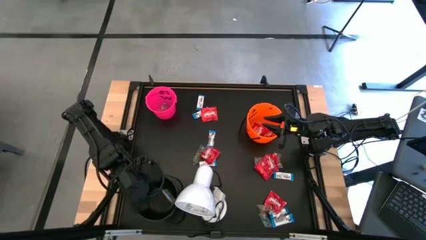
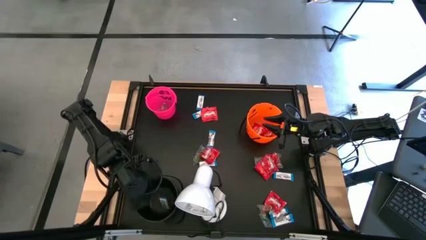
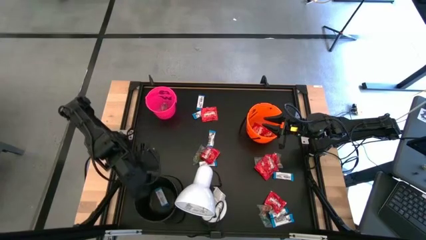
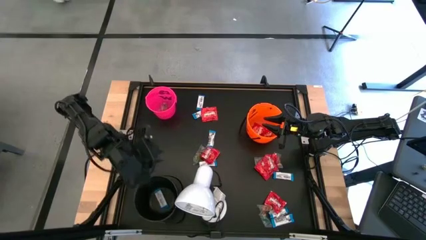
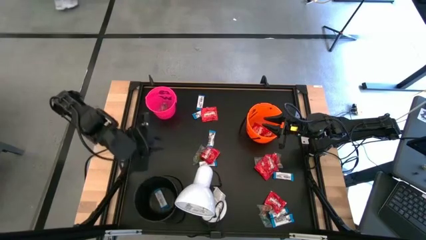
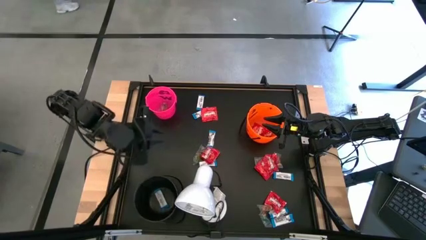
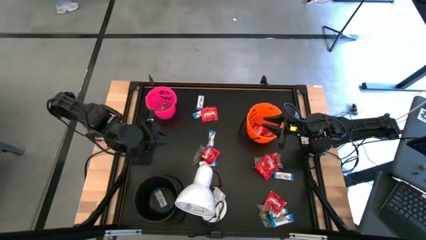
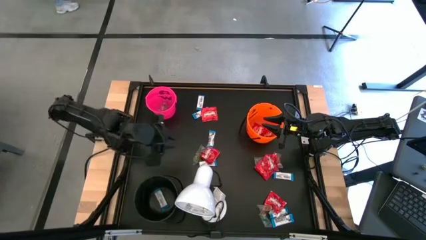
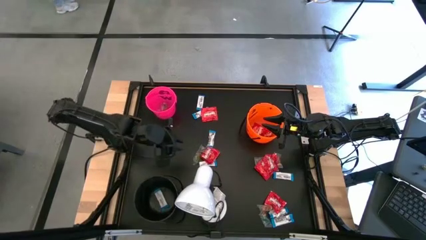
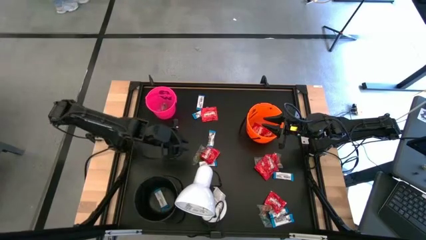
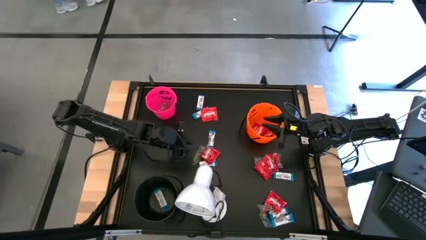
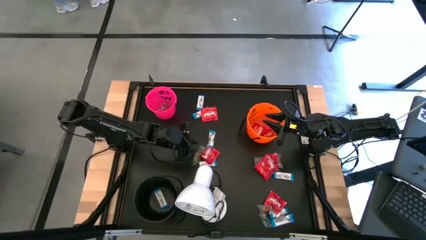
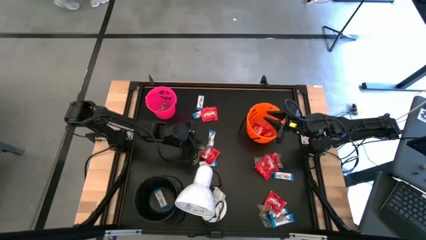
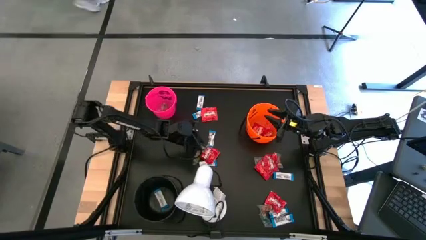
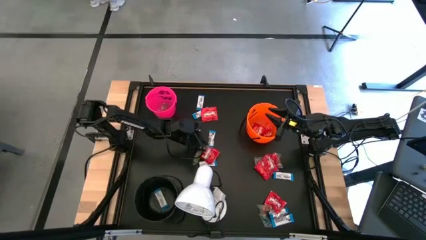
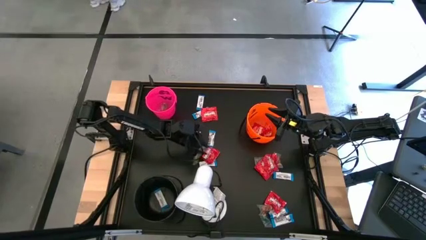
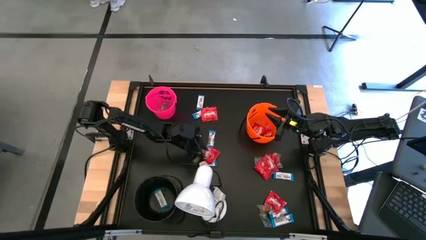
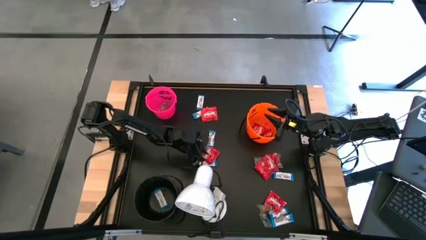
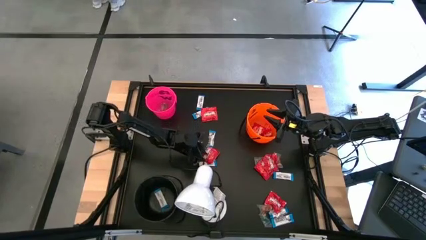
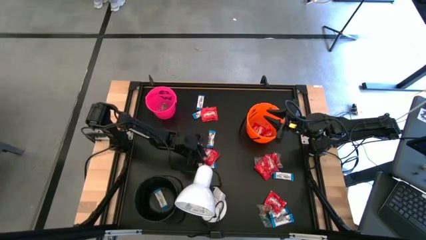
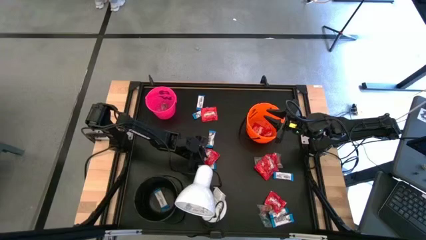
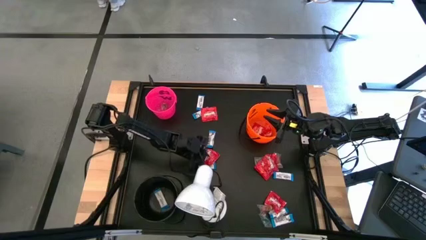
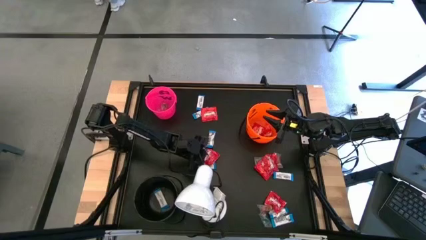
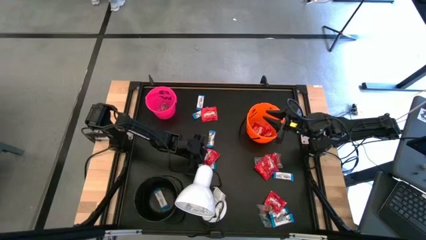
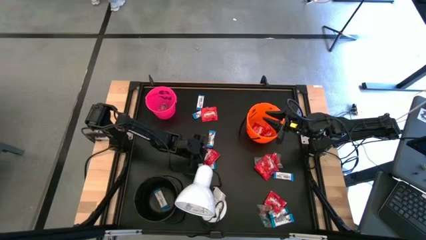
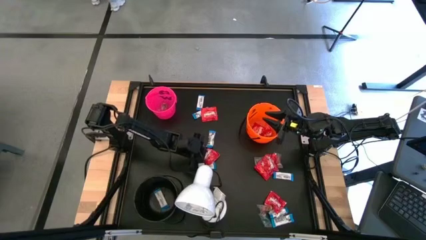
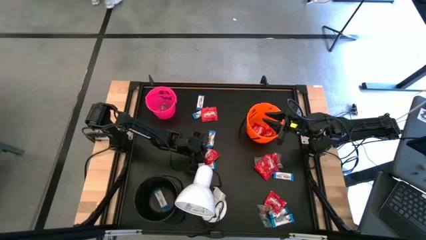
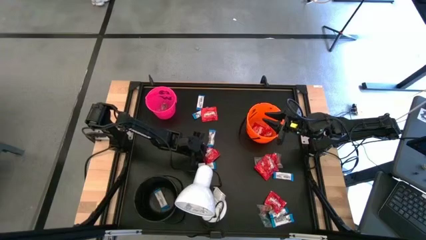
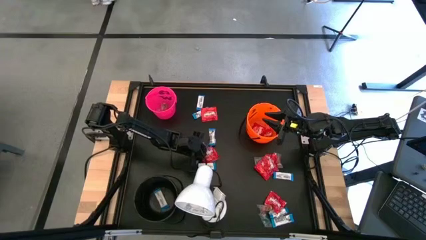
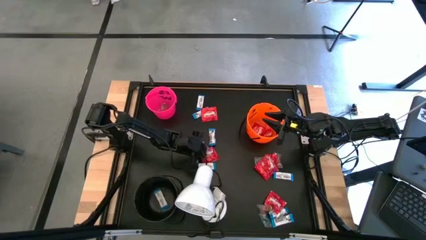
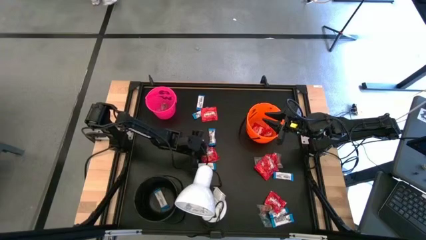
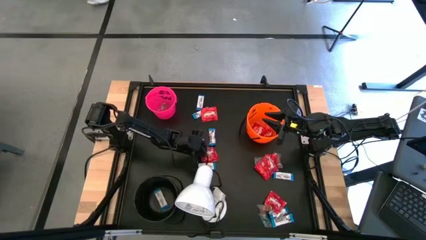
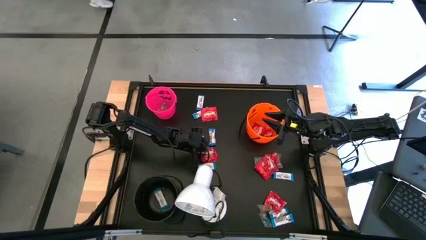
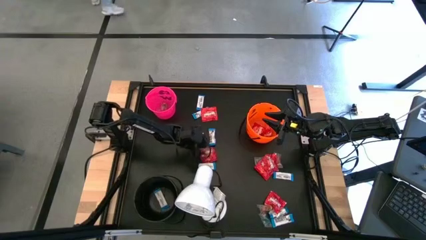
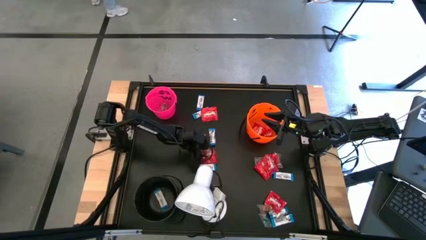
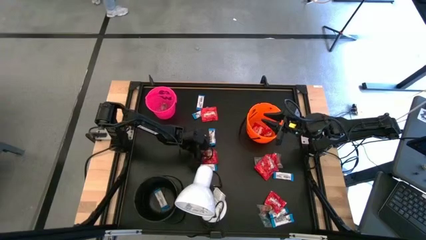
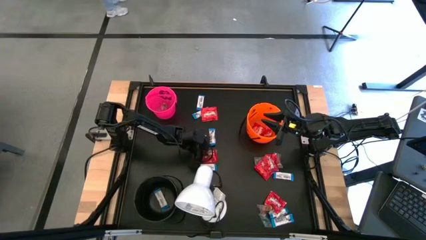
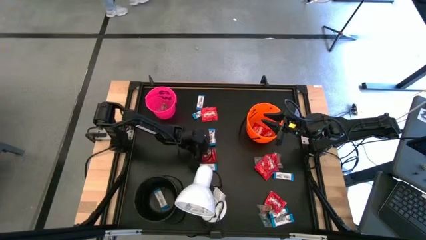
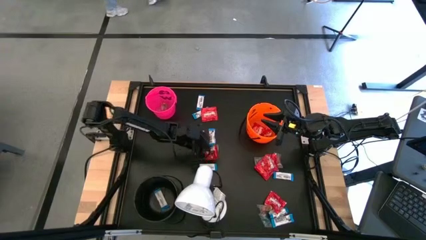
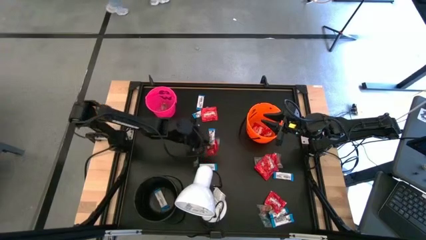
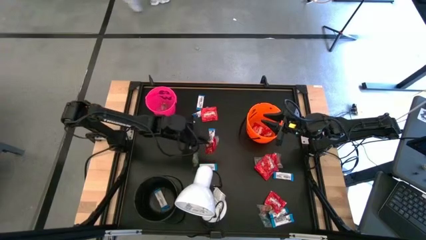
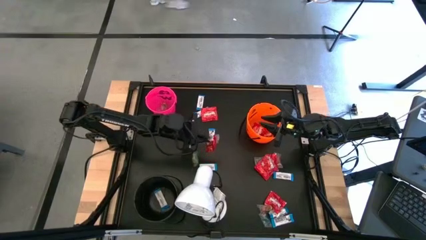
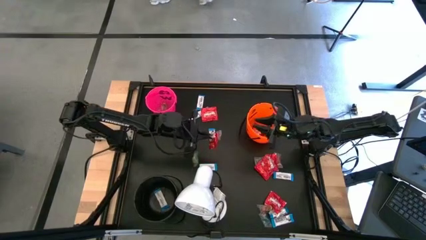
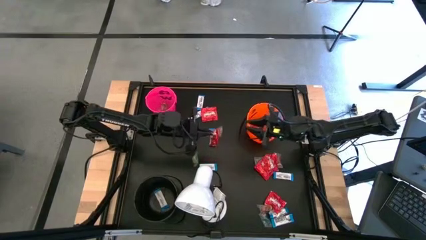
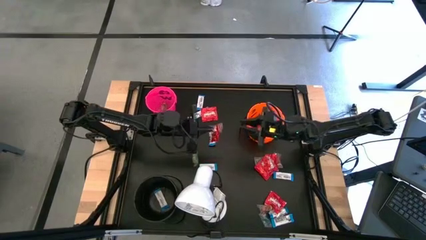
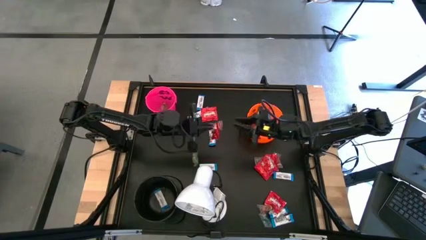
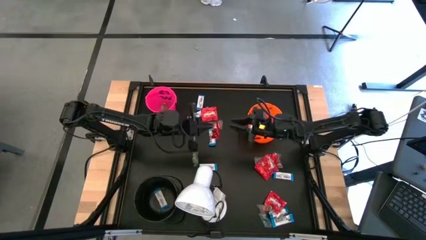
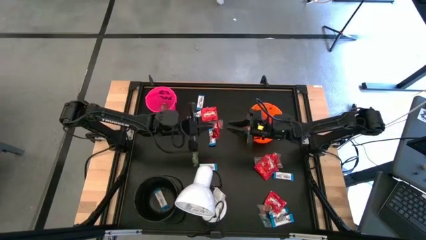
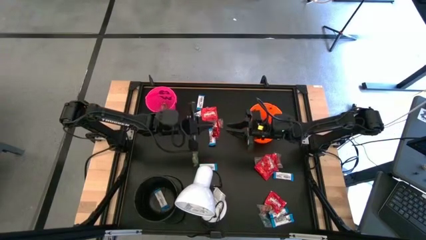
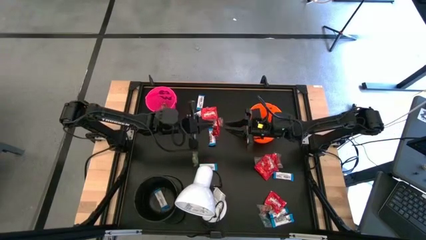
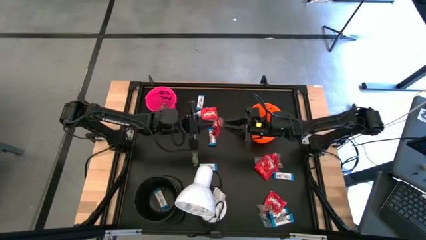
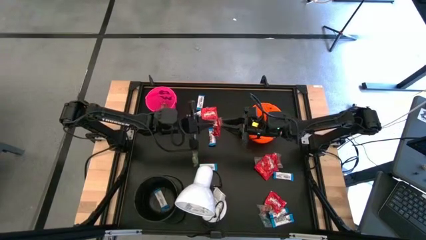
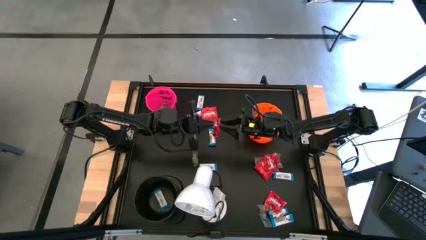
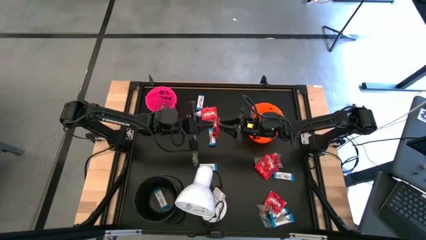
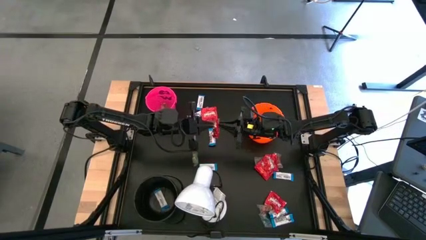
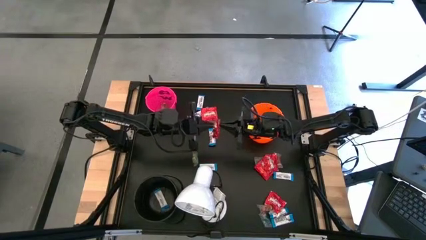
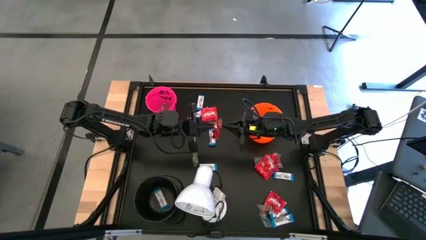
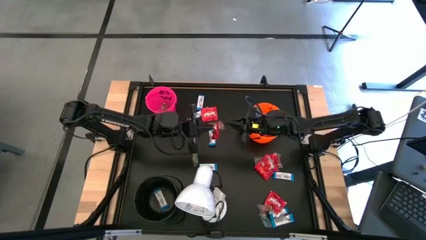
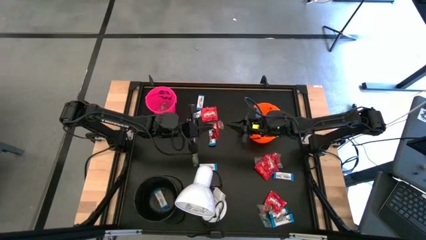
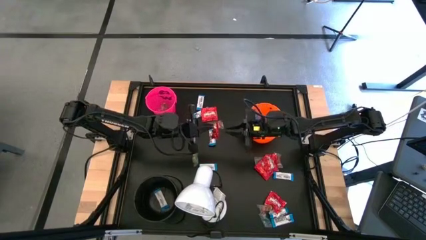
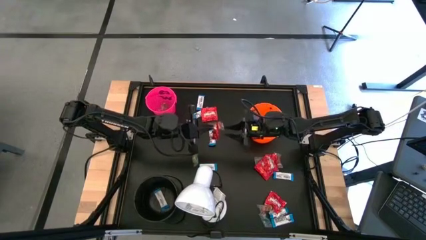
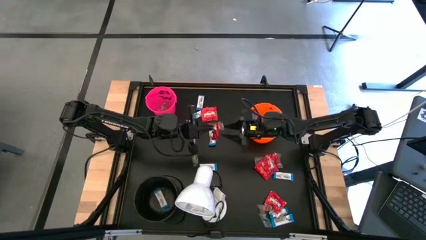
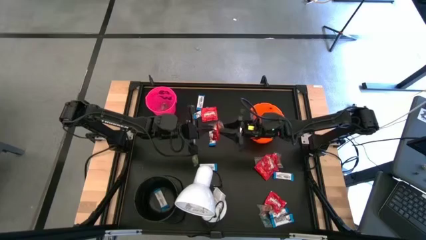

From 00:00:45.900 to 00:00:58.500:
Task: Sort candy
Put the orange gummy into the pink bucket
